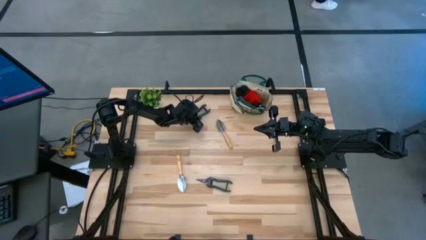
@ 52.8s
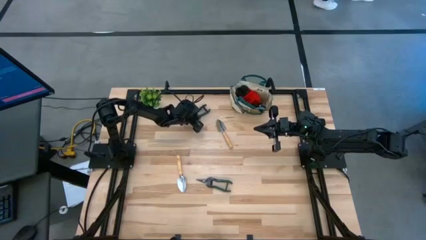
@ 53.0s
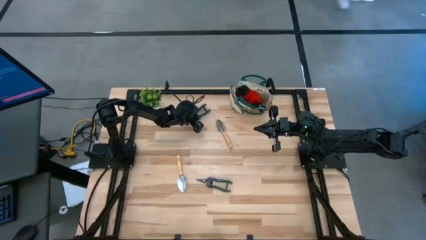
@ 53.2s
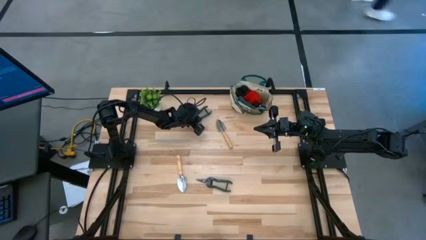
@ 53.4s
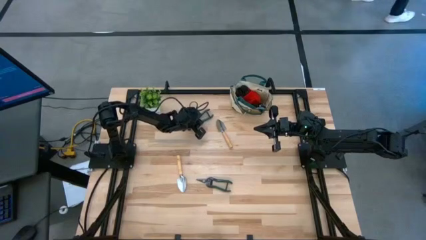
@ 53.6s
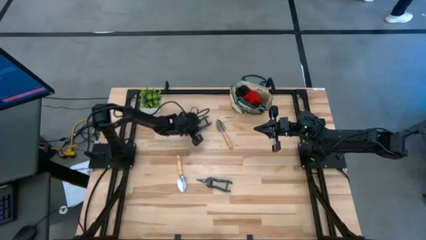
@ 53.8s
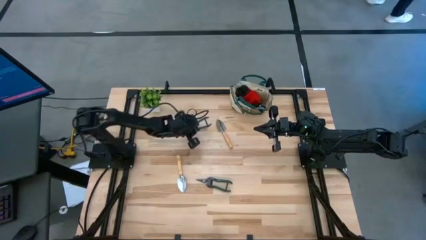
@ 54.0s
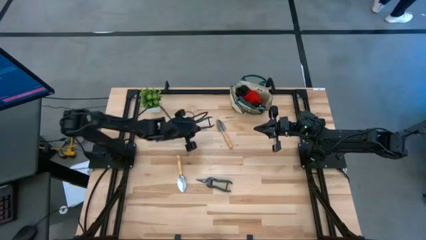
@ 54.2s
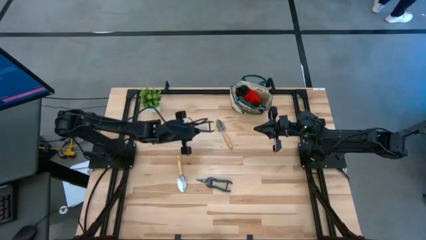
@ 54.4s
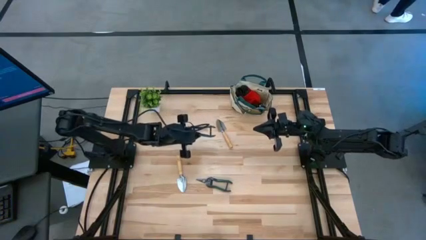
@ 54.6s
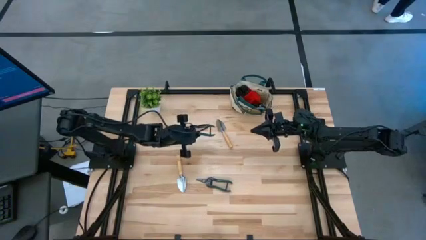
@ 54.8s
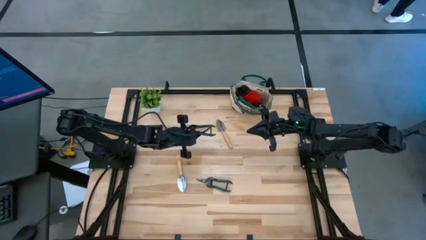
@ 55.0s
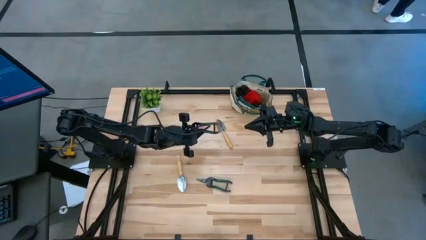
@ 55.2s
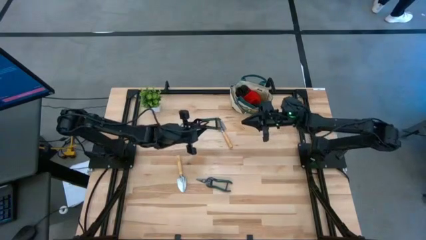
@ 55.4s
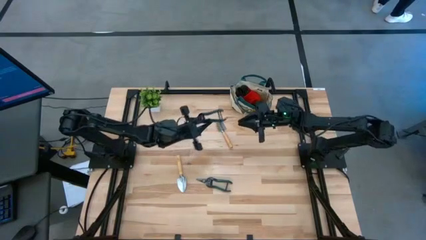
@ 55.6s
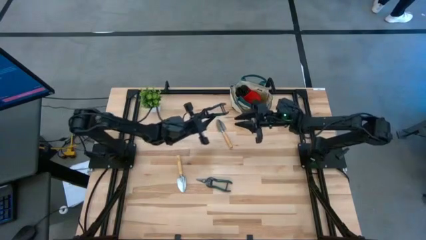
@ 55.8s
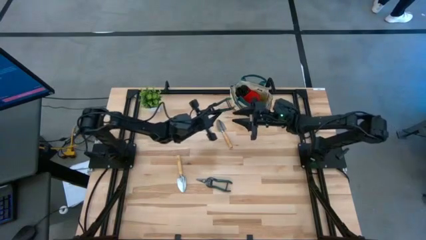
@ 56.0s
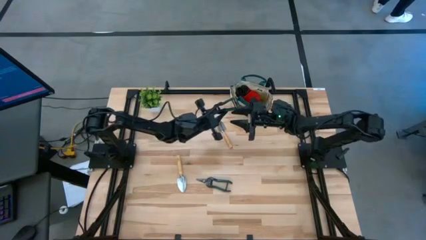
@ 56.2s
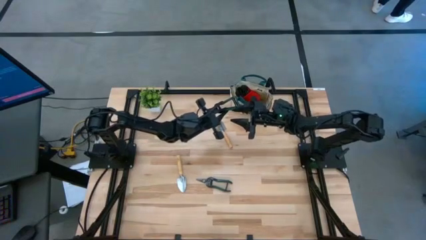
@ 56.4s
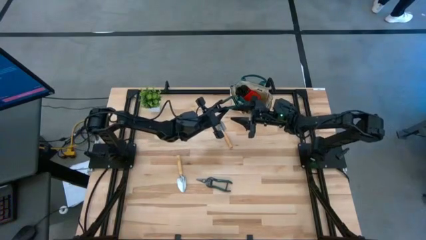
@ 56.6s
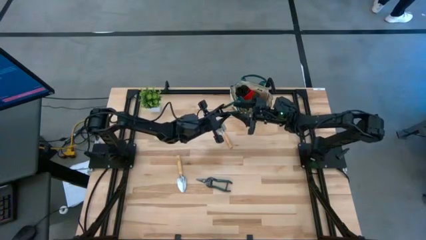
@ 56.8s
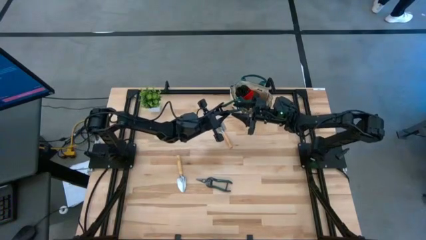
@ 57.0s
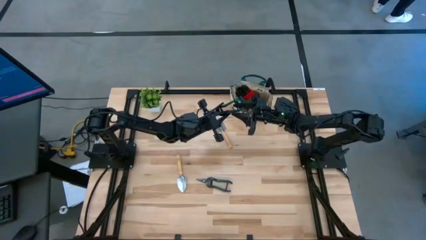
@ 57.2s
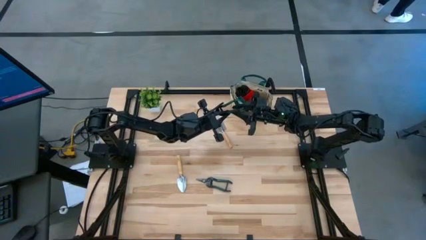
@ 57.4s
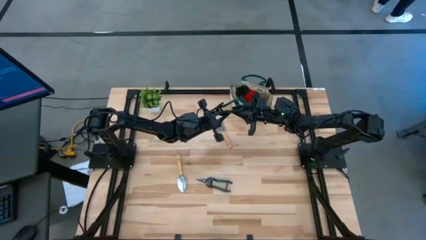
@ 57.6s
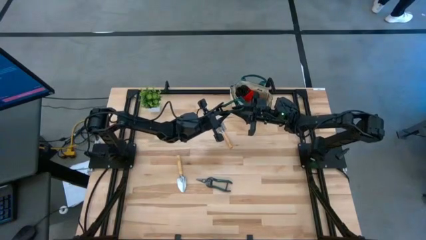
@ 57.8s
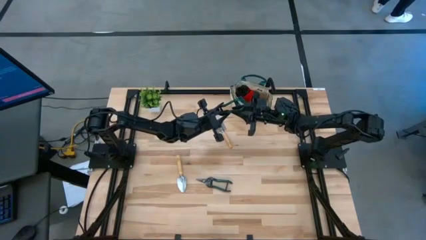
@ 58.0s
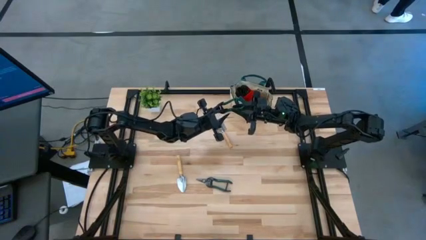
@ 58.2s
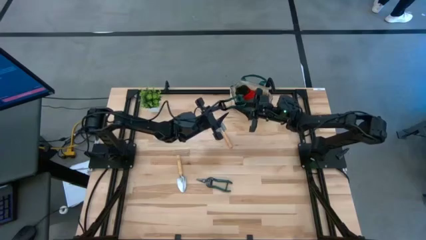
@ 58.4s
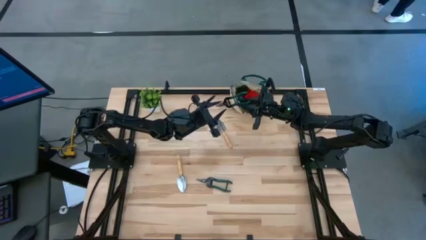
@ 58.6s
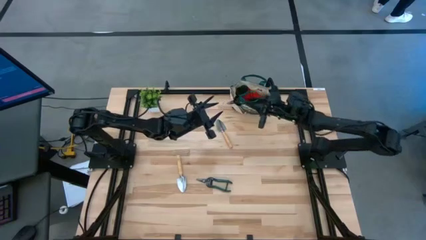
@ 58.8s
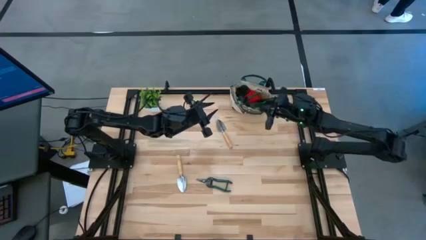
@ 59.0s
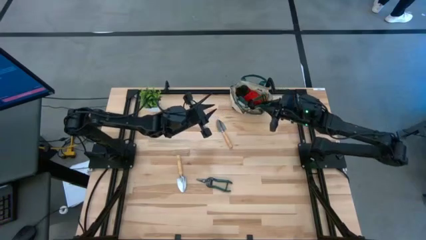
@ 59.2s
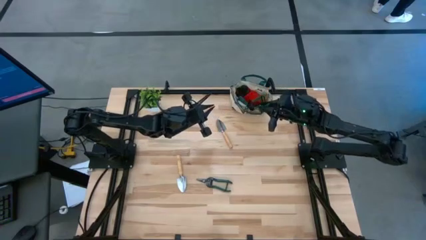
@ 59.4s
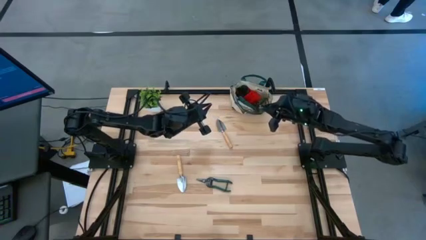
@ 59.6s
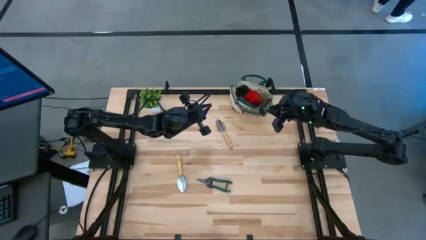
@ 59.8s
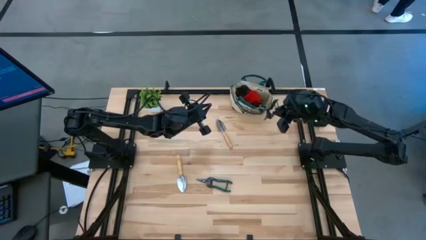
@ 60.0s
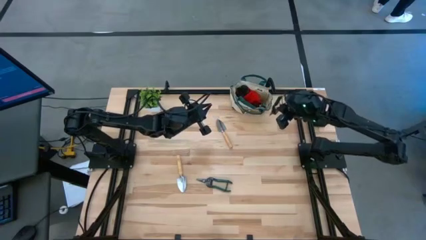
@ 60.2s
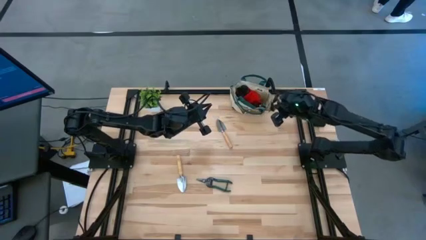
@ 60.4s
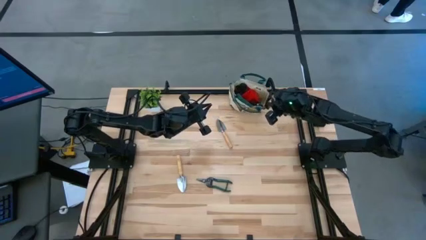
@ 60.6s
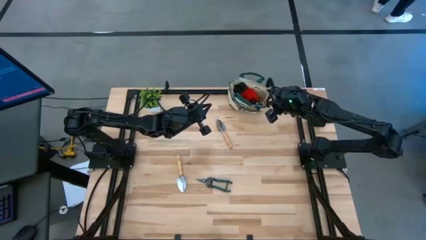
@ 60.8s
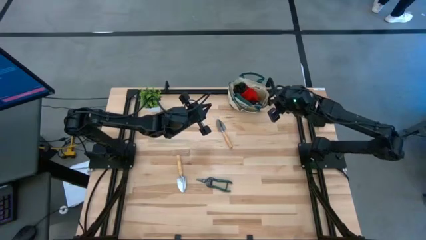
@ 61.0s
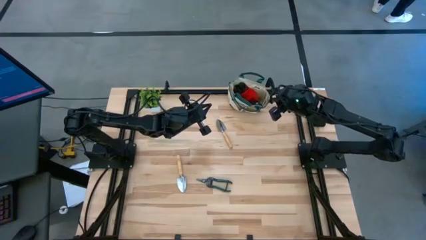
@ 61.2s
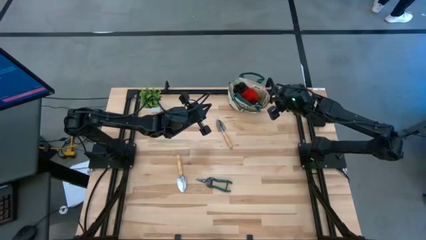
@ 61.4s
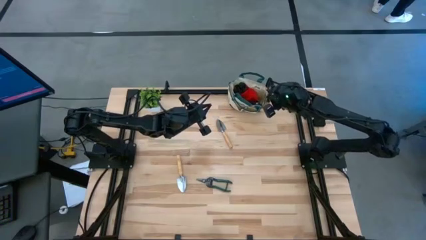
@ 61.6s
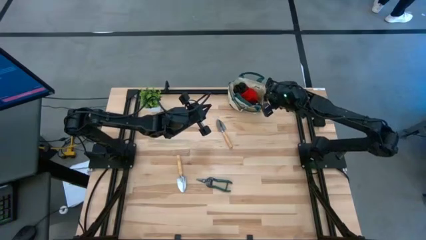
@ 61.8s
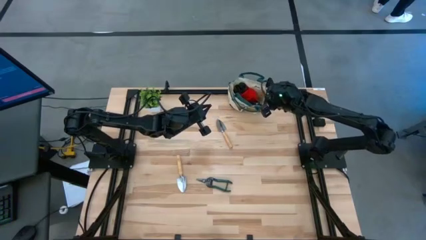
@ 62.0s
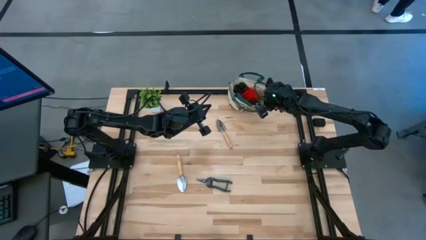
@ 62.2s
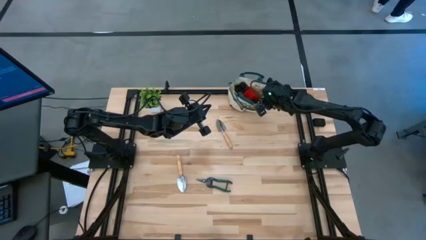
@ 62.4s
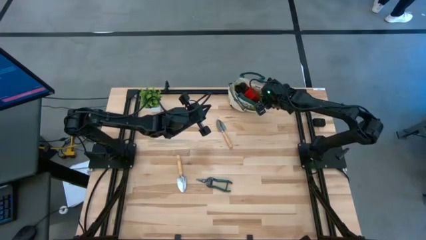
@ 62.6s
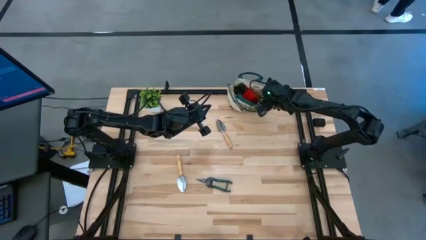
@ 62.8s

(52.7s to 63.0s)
Task: Pick & Place Garden tools in Gardening bag
Put the top green shears into the gardening bag

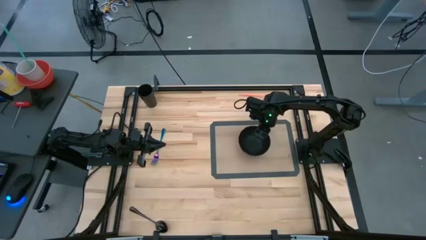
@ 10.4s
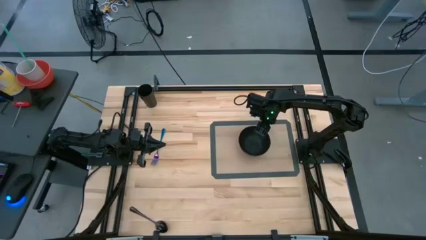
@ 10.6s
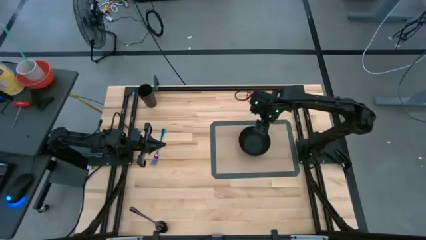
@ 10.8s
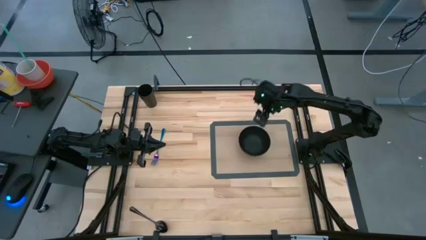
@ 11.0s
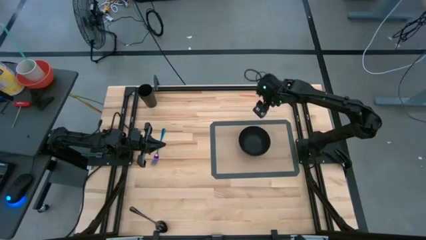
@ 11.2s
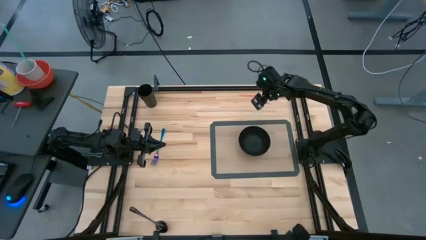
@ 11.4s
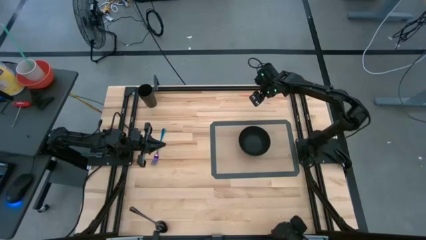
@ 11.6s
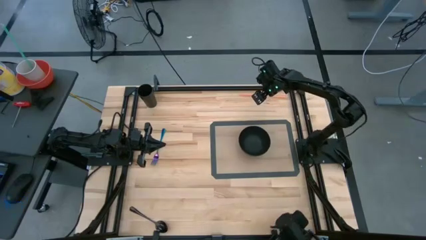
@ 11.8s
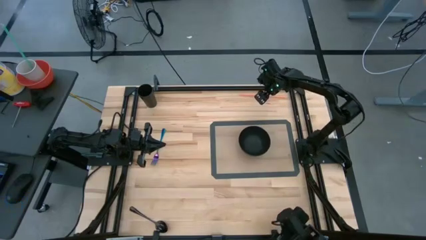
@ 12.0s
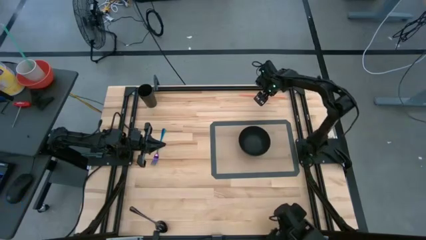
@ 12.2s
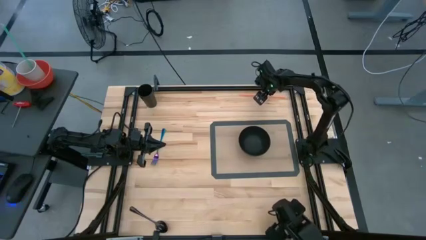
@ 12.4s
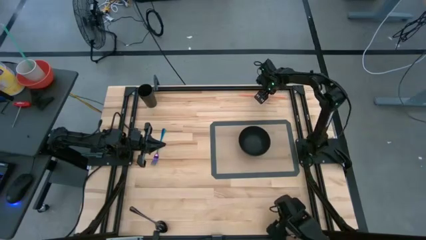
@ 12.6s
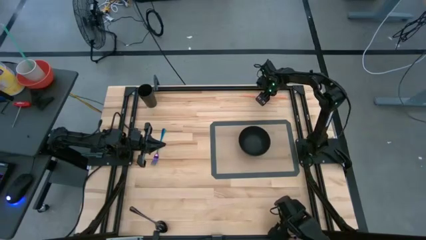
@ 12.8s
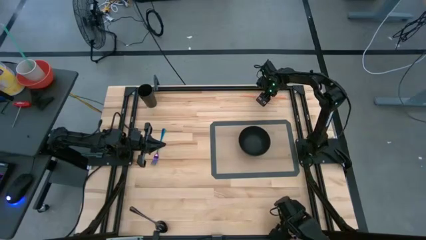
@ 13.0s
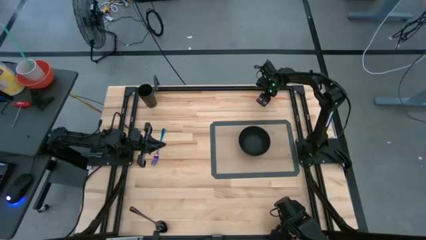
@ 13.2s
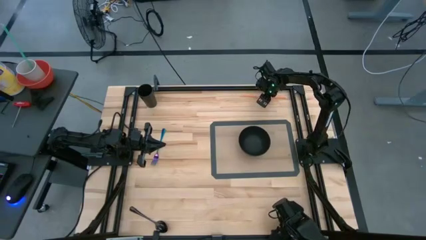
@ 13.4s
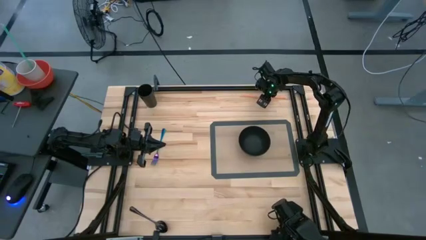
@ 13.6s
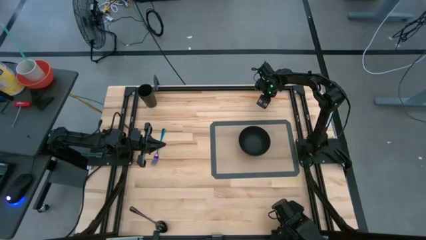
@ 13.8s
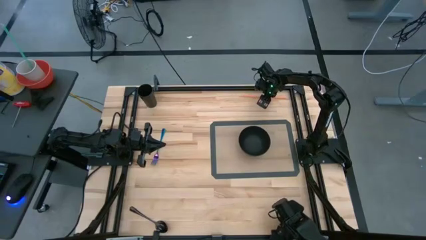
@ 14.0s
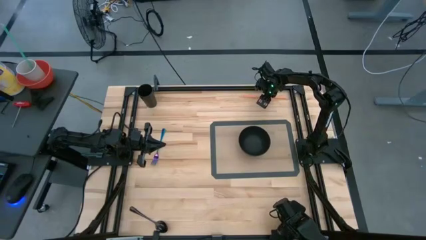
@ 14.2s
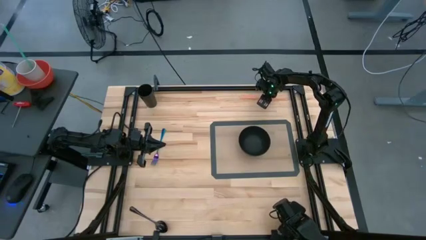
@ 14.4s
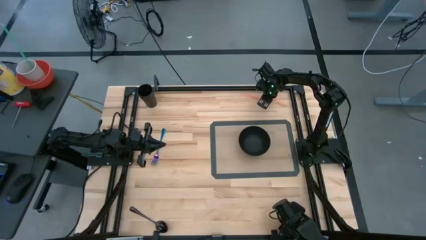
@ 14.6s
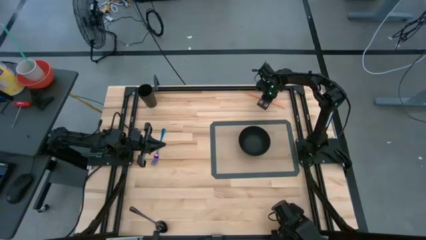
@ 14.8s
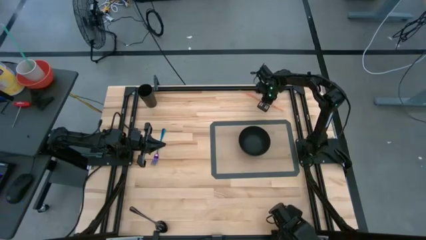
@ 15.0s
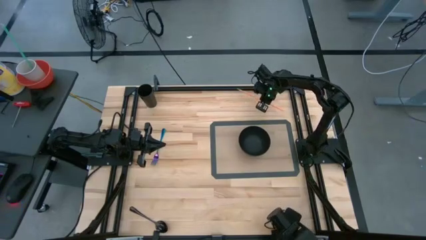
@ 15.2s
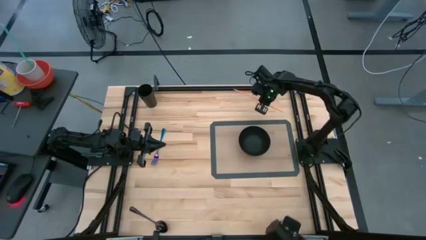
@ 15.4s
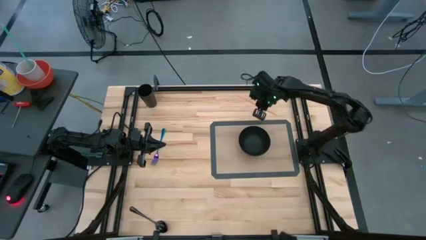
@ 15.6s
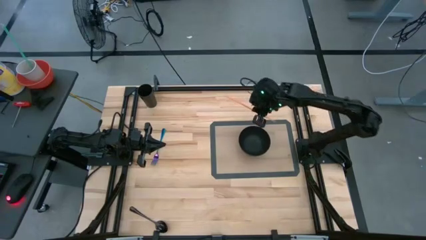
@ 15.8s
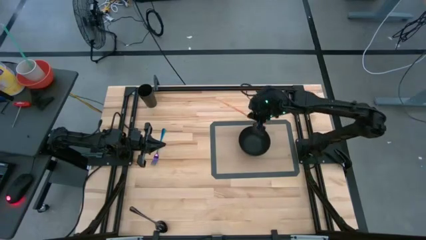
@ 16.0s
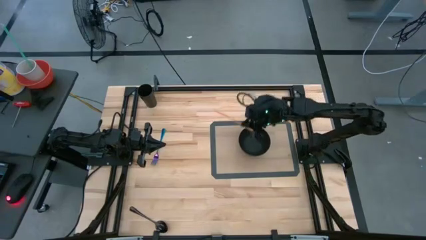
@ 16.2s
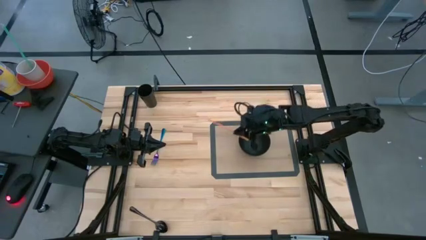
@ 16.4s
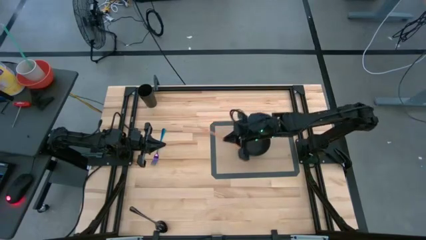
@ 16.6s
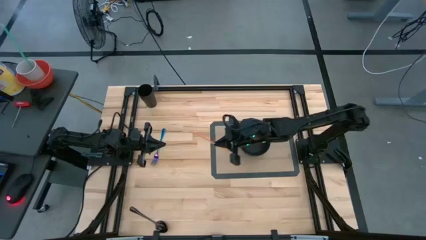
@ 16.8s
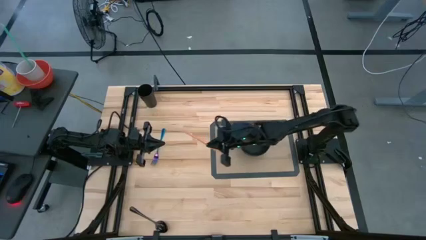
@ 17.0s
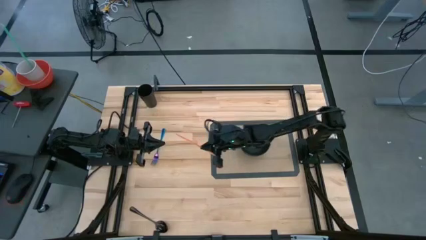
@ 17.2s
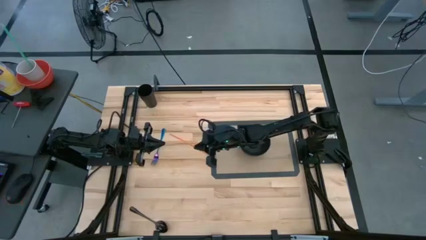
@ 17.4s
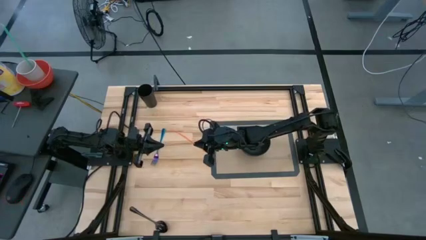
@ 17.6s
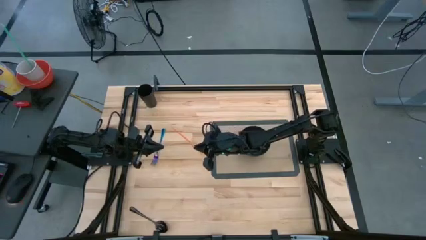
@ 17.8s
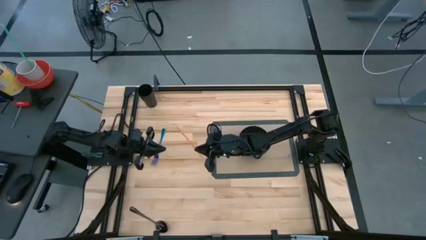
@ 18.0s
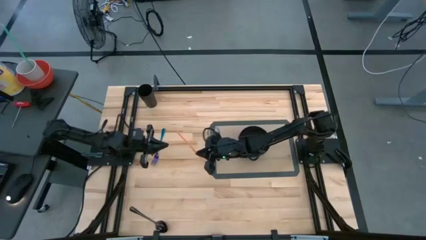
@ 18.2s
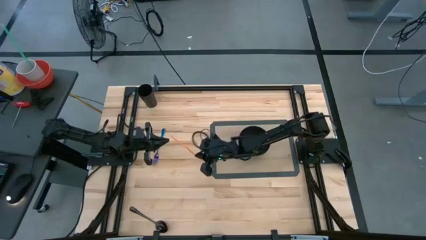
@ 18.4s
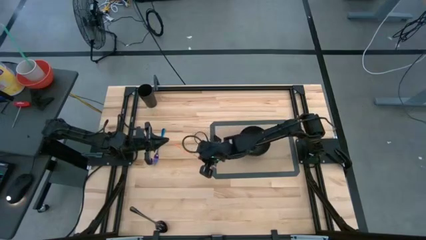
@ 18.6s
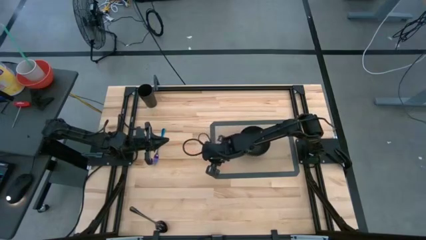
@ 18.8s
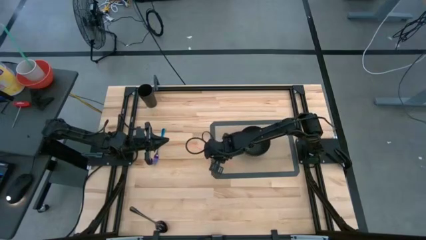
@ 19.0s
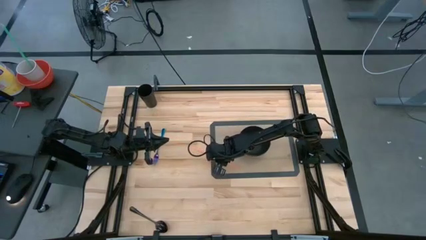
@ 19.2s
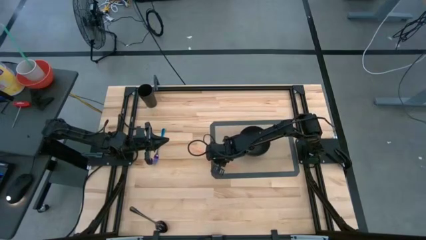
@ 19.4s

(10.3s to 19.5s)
Task: Pick & Place Utensil
Move the orange straw to the middle of the table
